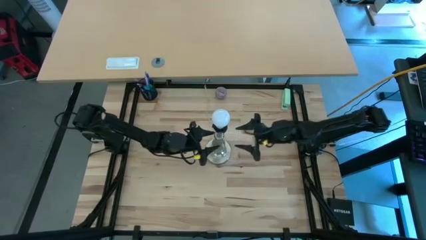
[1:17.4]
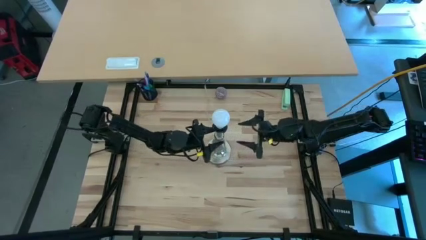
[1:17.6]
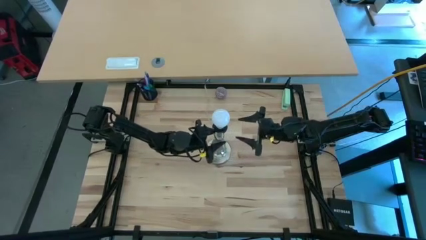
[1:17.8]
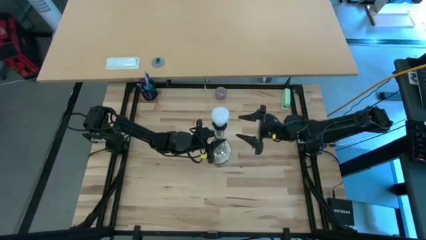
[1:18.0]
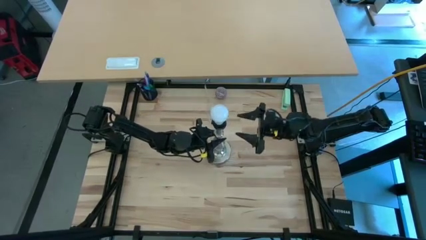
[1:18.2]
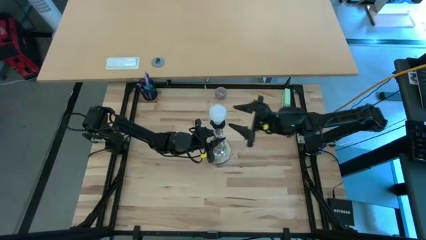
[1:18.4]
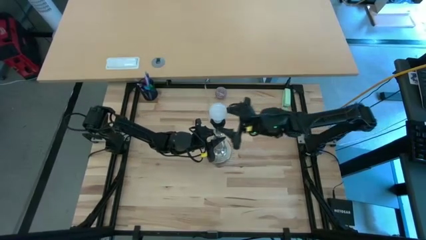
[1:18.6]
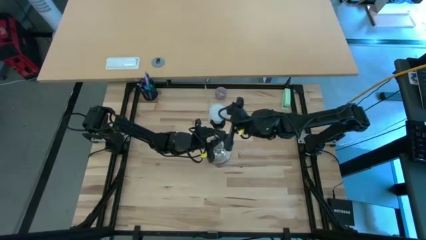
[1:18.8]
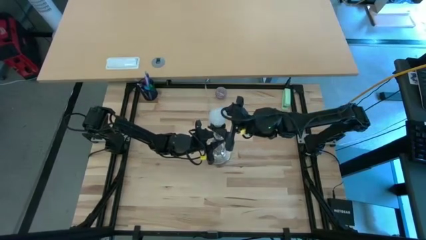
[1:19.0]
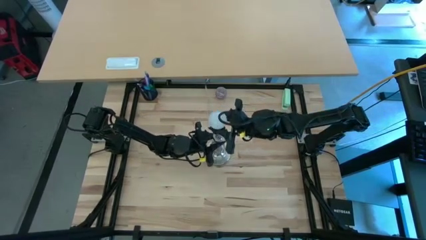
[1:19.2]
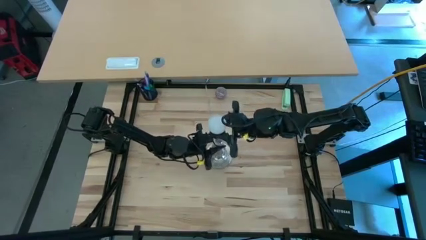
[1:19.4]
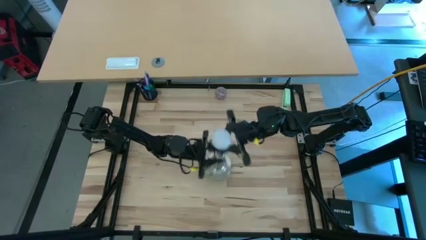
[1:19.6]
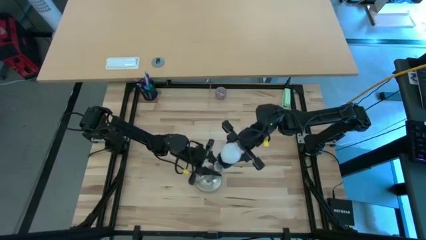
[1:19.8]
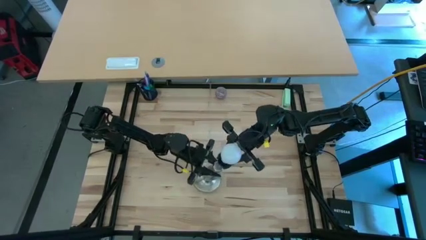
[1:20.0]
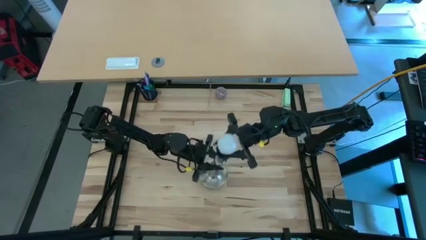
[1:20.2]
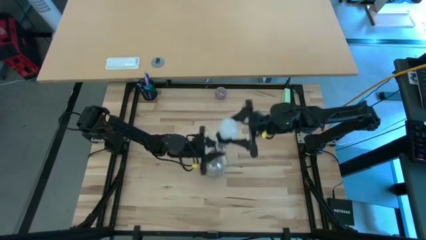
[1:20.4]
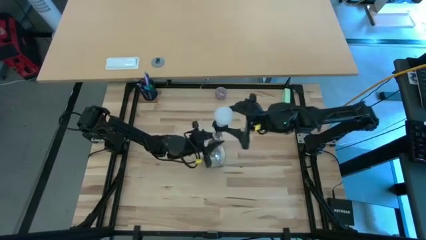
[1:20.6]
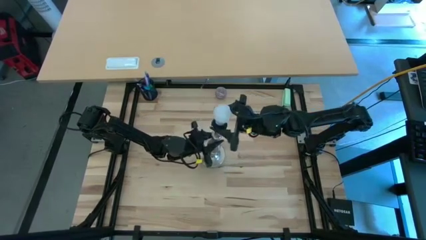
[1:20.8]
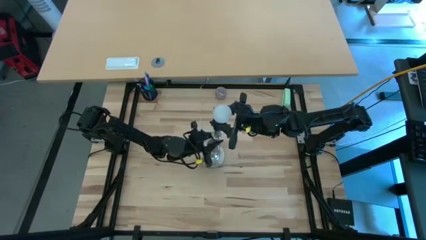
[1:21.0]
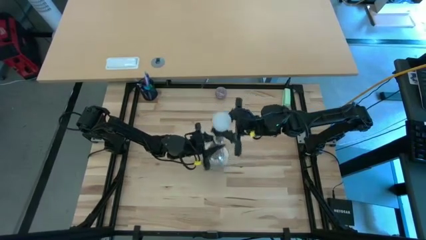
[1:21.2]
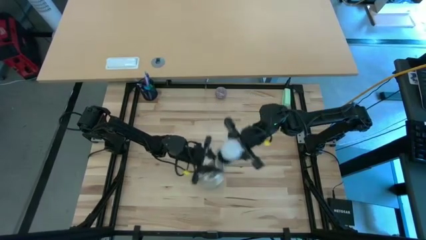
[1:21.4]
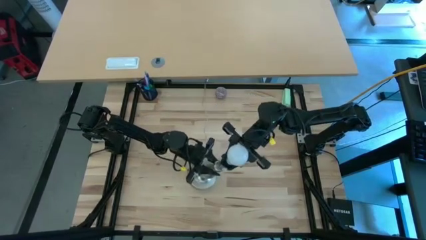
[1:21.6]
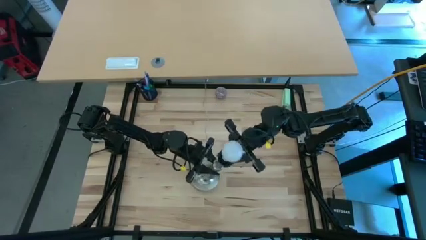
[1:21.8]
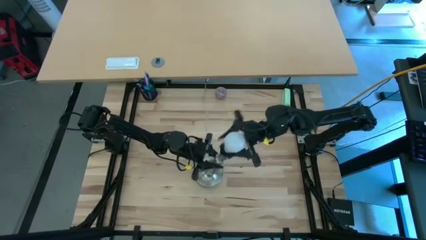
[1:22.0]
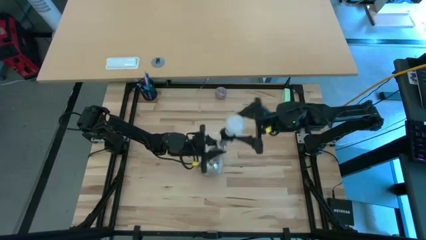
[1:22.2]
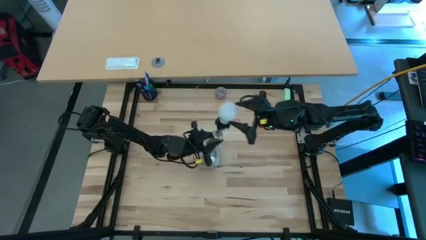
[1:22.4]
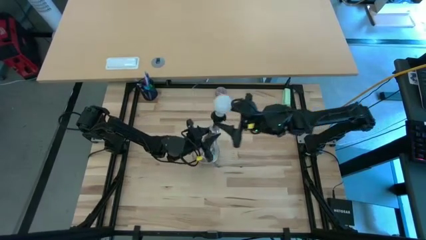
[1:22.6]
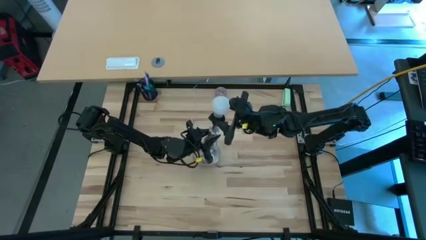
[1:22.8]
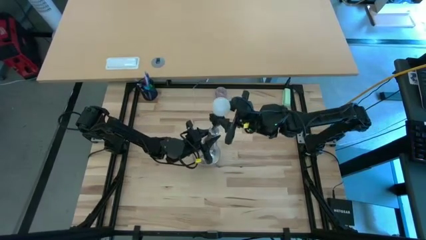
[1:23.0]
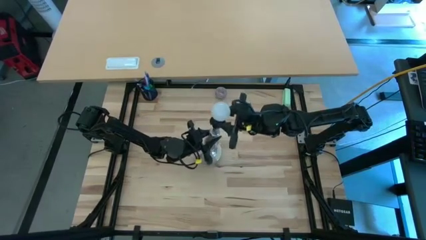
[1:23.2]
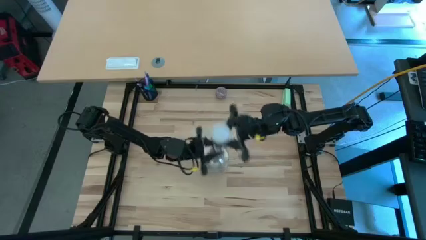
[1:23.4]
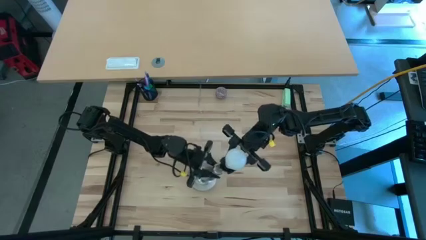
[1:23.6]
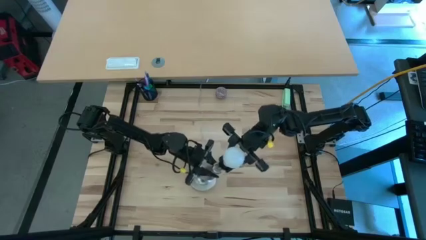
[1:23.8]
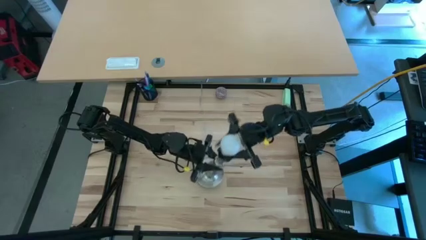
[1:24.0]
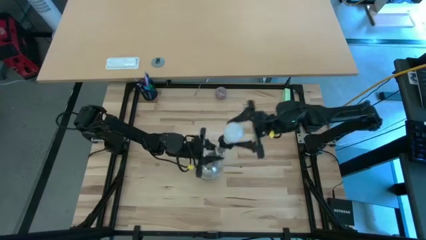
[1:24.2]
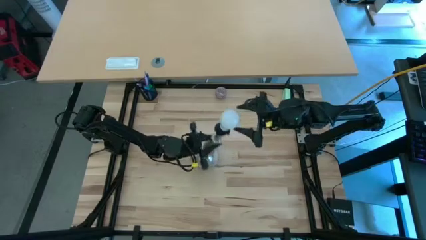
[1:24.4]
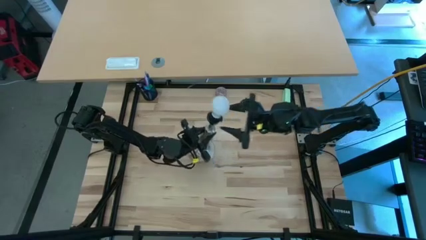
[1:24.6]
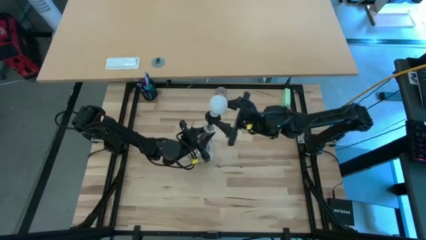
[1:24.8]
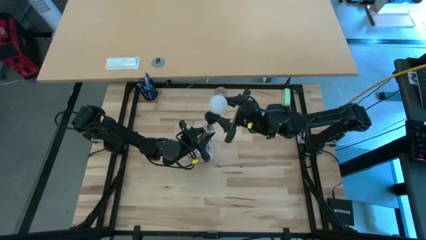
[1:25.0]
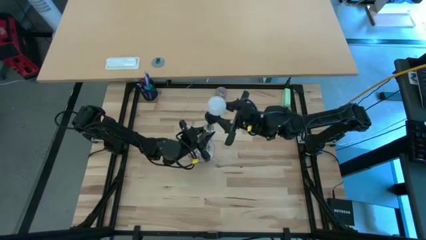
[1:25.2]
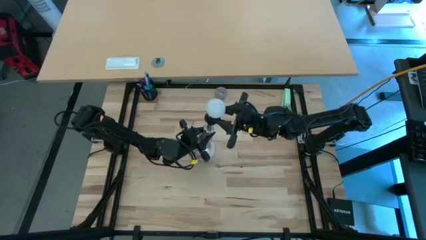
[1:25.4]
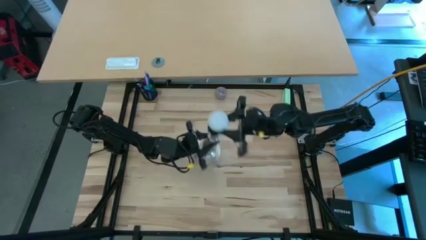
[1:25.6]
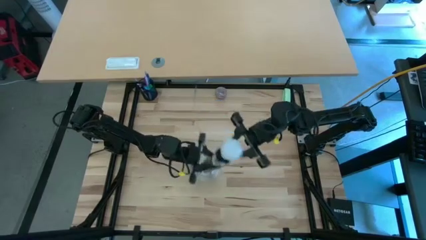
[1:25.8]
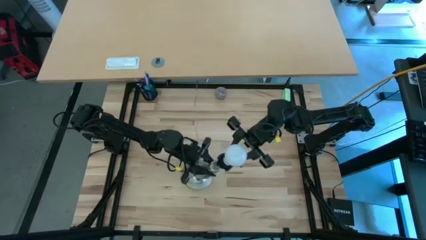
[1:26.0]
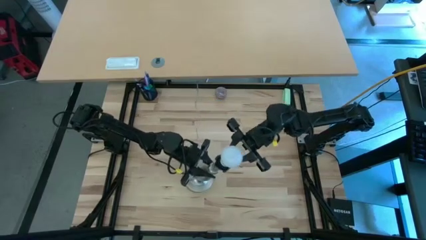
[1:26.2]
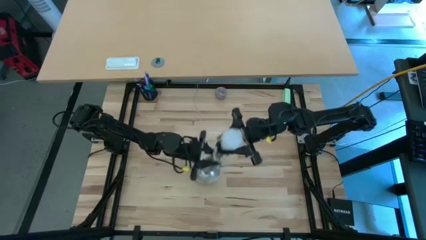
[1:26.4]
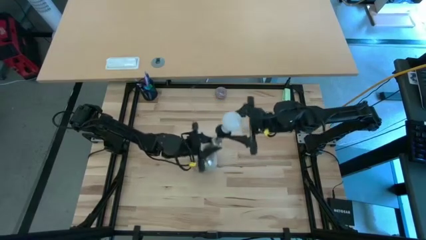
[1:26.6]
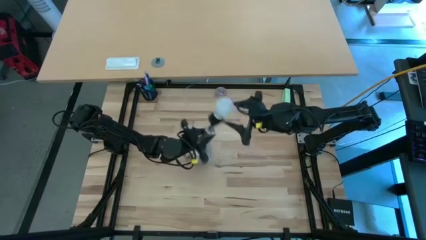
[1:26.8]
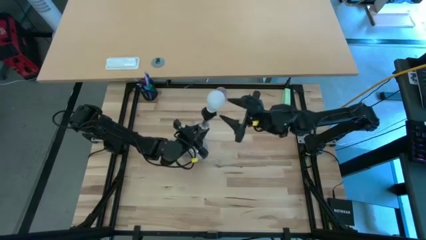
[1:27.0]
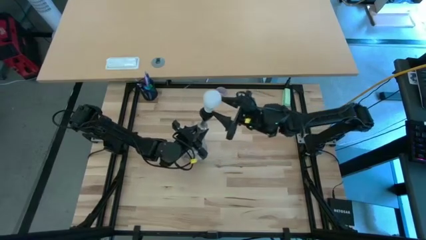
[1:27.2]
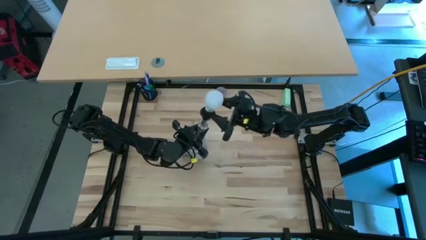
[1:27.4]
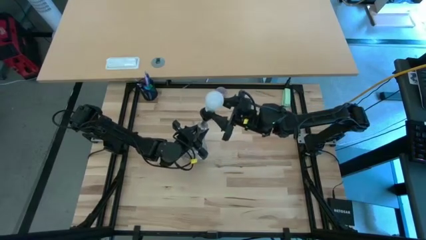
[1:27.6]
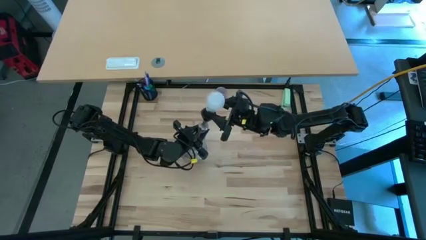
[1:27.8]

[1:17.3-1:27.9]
Task: Screw lightbulb
Remove the lightbulb from the silver lamp
